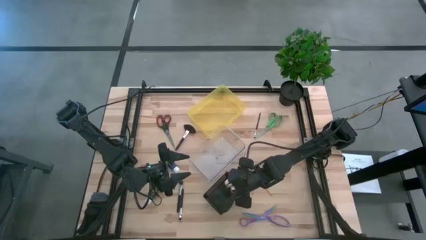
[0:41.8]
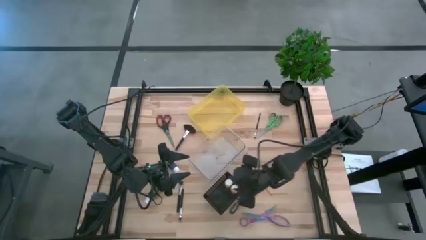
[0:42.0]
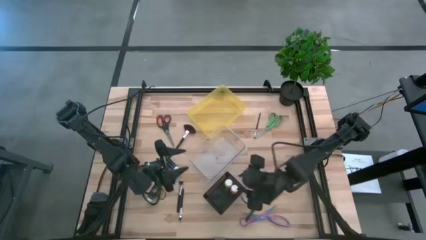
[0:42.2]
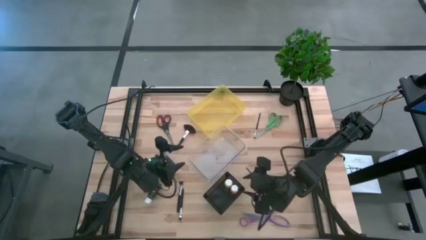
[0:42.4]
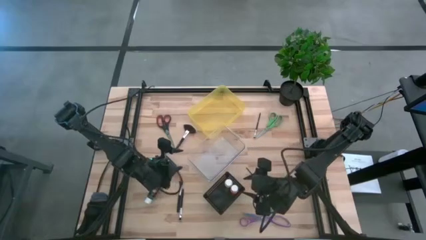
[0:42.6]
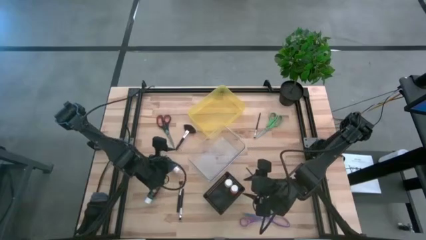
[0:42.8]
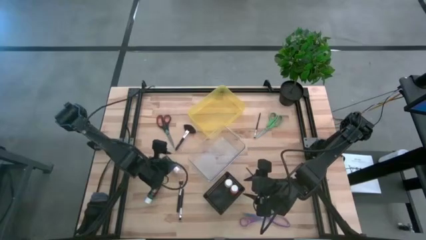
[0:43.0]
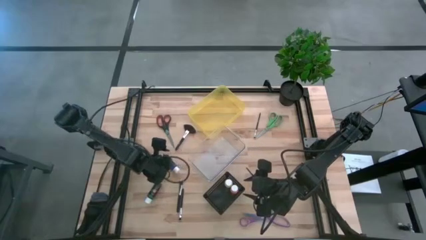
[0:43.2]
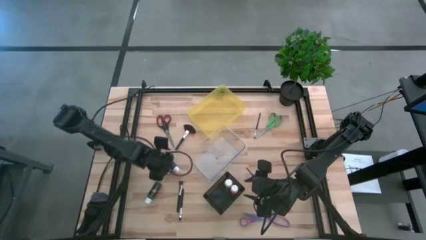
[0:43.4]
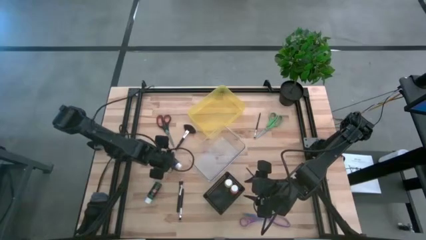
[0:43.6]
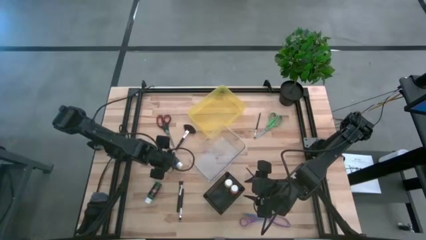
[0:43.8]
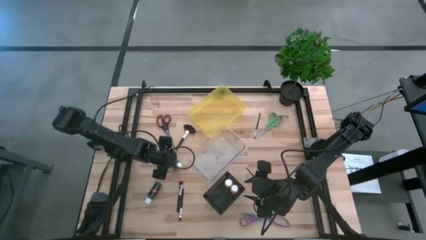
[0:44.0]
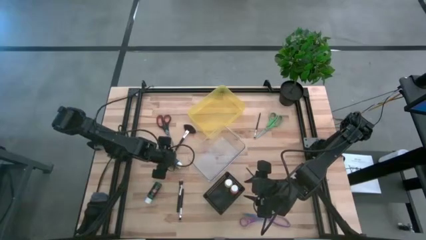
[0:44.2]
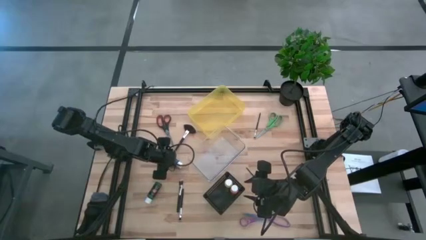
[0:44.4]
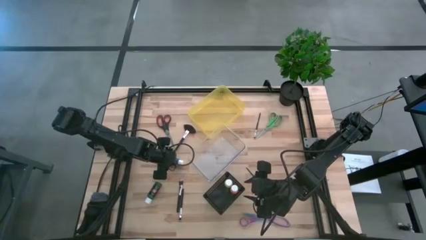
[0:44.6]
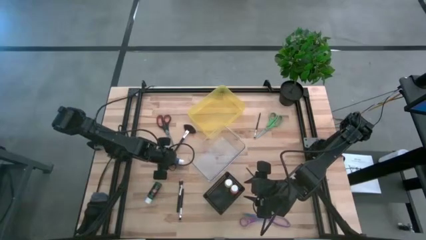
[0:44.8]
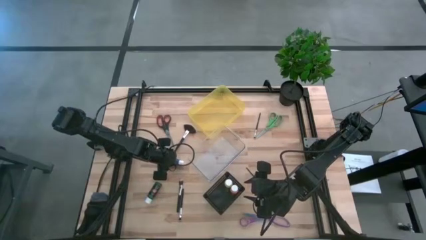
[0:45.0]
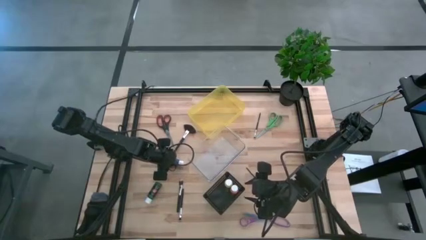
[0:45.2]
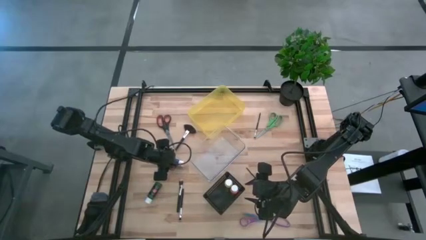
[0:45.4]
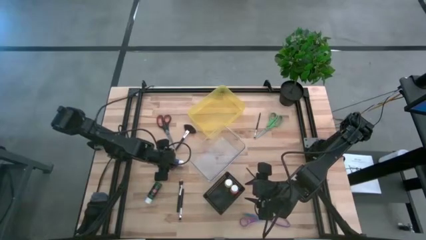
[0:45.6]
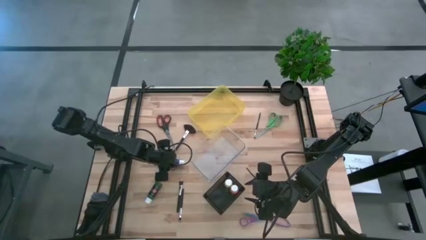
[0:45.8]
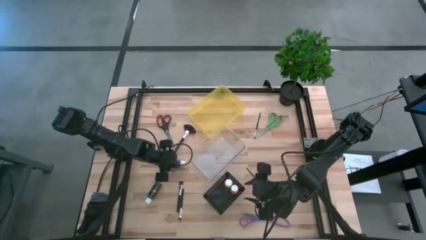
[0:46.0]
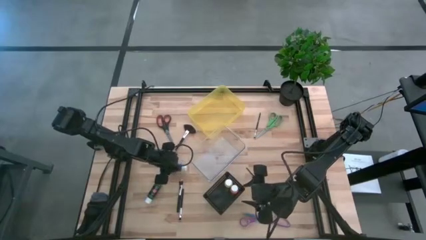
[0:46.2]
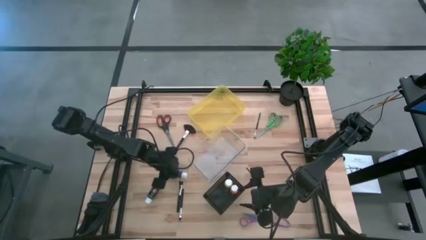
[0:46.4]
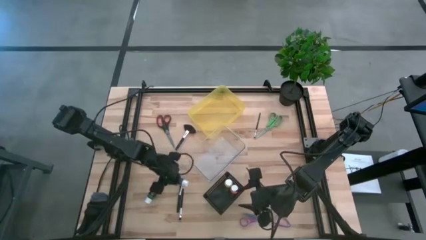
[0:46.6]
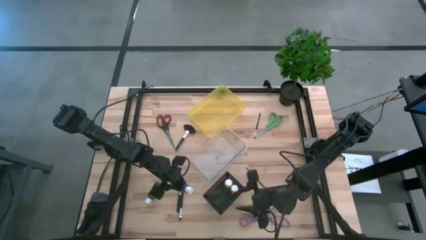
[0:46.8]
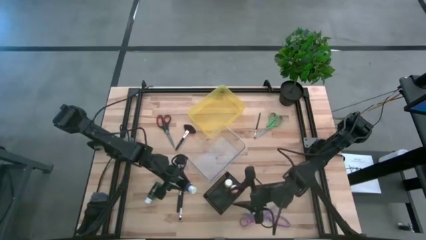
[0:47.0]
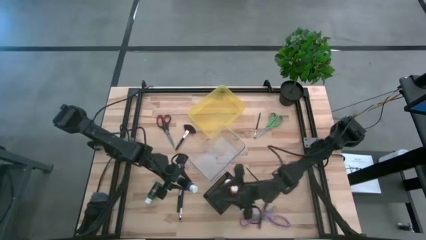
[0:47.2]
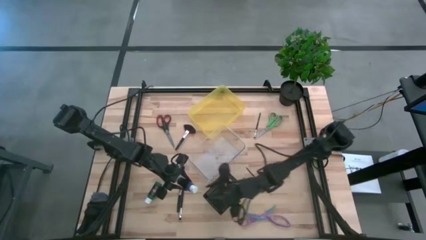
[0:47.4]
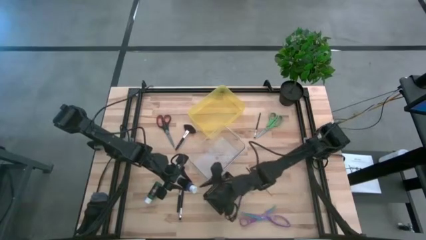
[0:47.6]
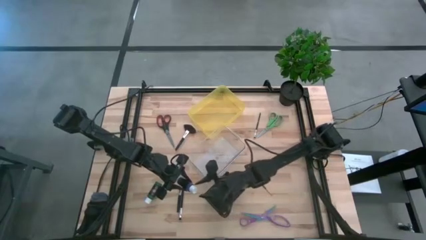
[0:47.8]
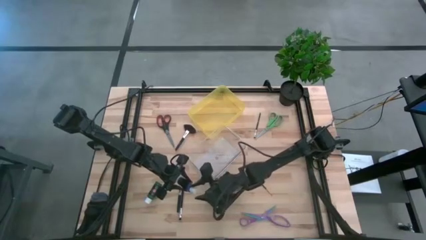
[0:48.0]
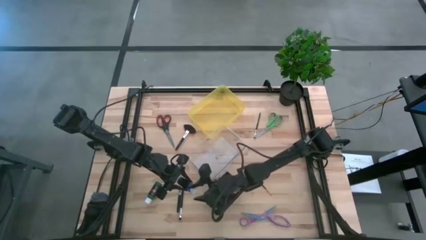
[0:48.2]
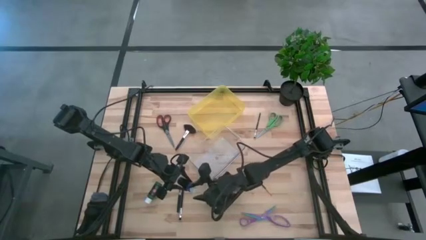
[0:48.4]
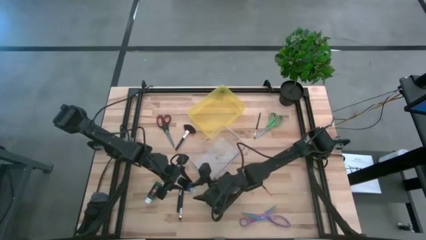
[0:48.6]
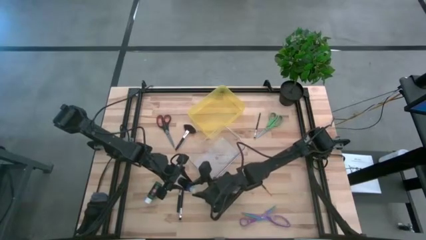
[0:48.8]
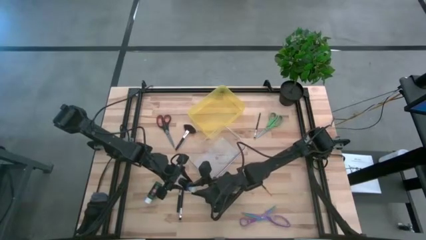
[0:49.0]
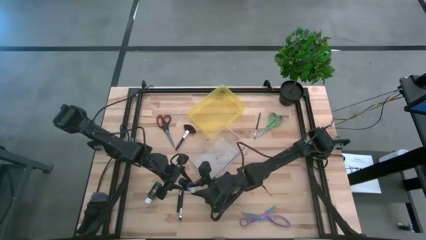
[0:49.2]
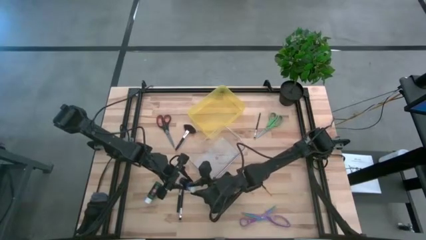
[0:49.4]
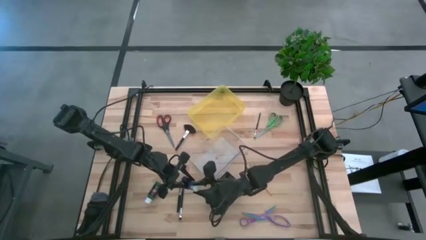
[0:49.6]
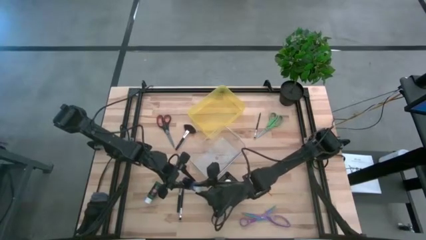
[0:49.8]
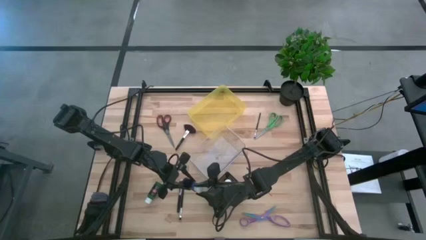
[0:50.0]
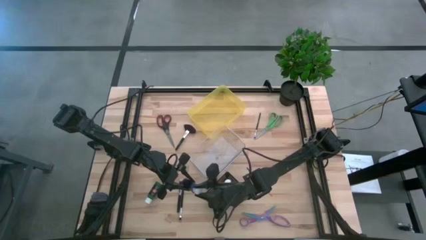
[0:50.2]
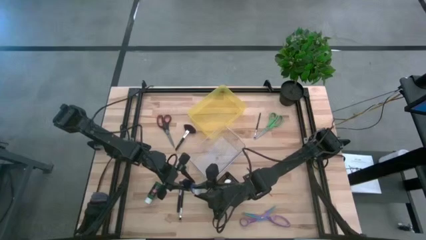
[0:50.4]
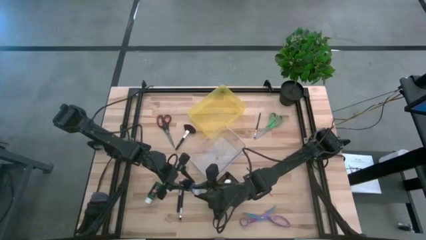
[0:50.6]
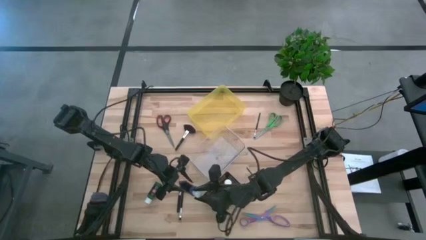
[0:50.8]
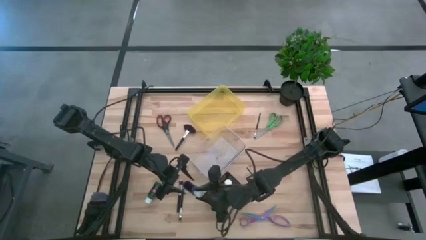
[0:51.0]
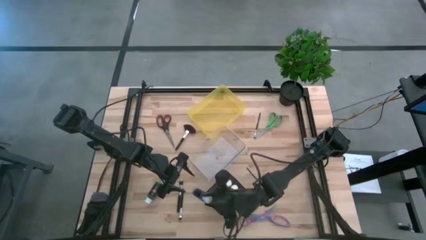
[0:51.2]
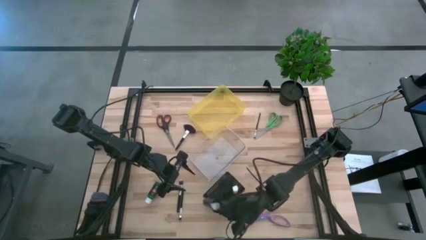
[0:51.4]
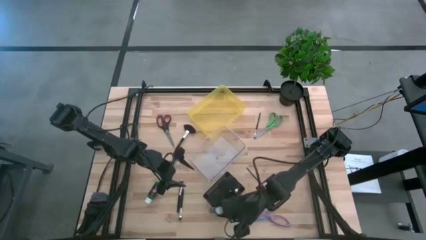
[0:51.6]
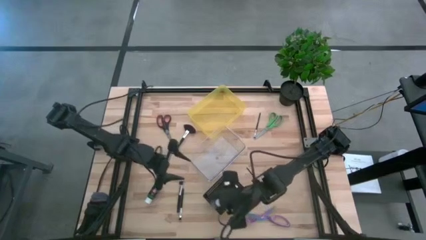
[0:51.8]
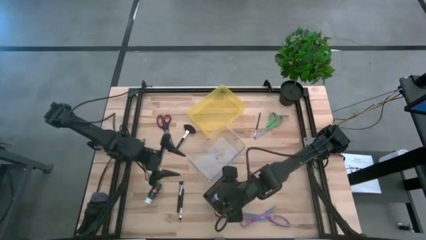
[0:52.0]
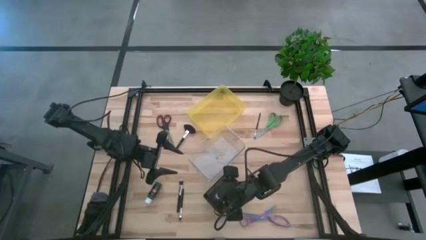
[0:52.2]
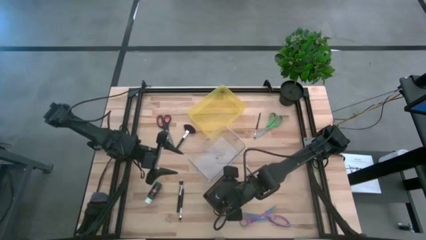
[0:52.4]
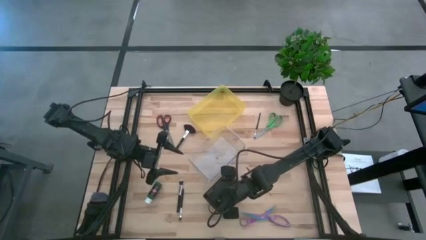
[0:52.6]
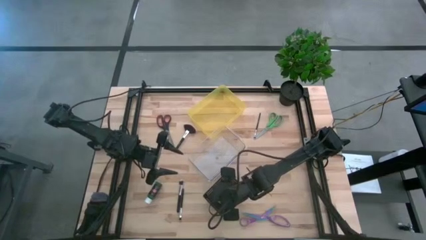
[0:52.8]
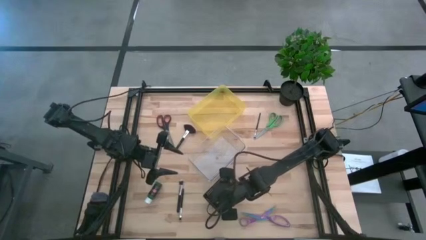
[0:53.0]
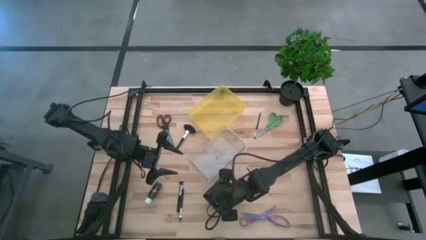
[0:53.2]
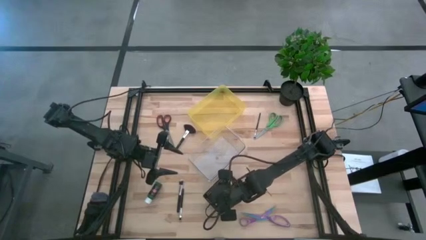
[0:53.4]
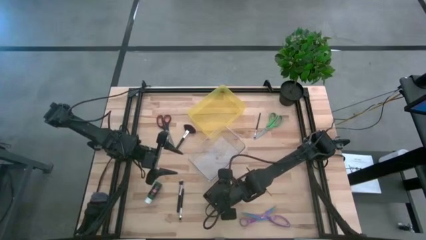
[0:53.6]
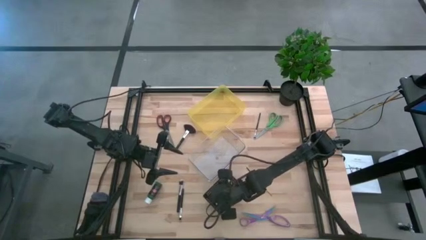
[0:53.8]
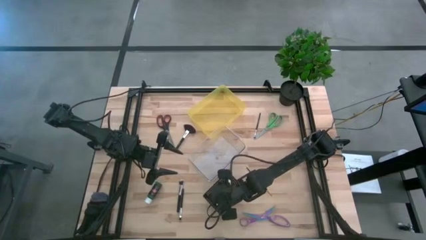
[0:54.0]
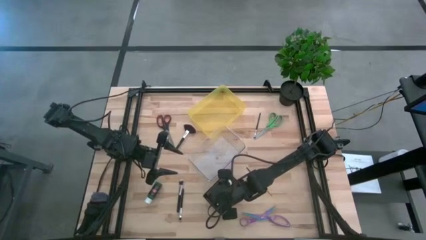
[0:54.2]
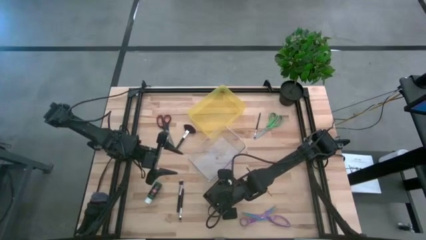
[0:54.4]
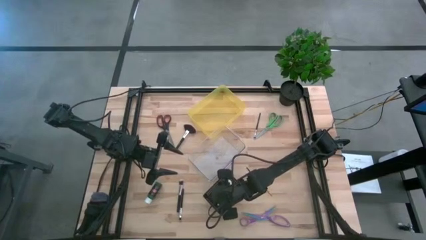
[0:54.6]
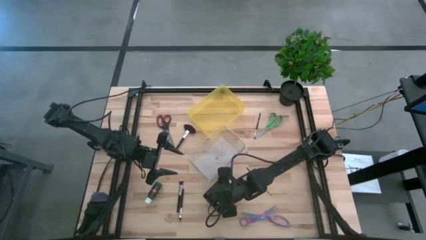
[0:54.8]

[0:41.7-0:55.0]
Task: Pick & Place Paint Supplies
Put the blue paint bottle into the black bin
